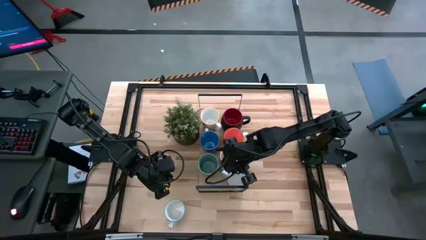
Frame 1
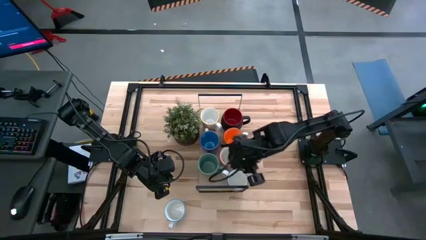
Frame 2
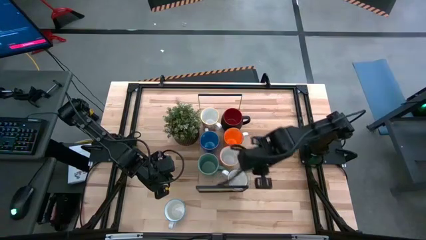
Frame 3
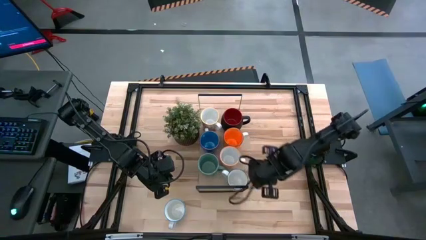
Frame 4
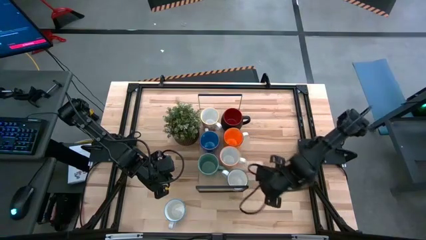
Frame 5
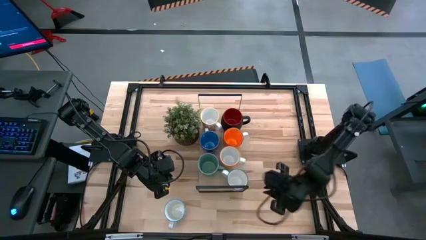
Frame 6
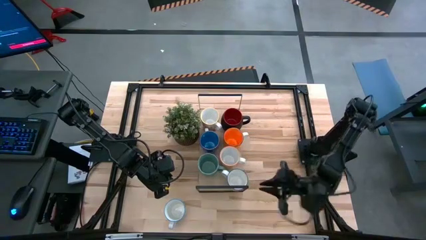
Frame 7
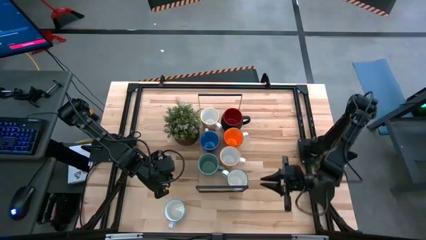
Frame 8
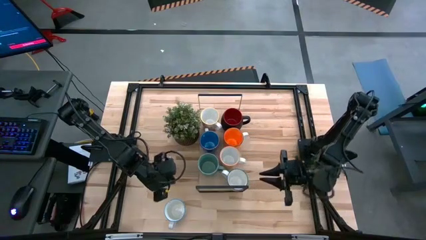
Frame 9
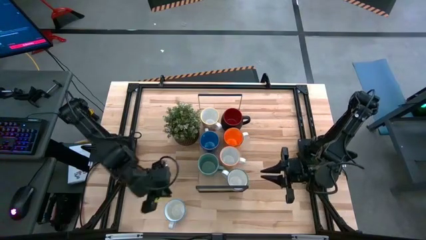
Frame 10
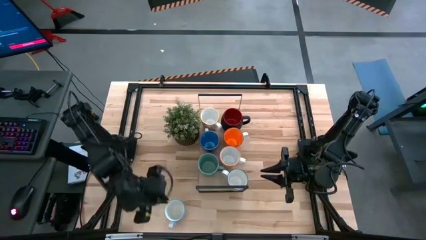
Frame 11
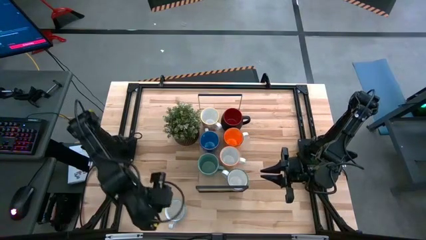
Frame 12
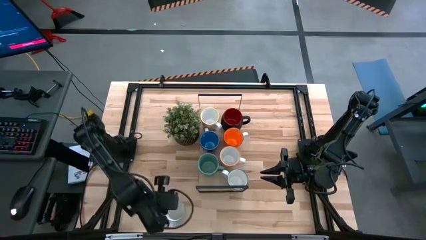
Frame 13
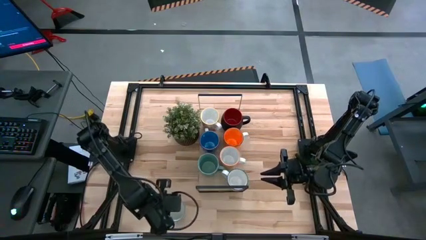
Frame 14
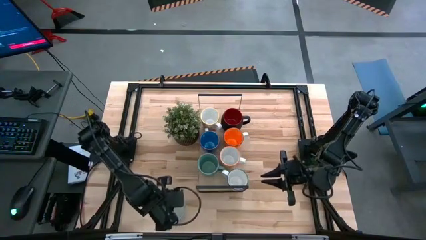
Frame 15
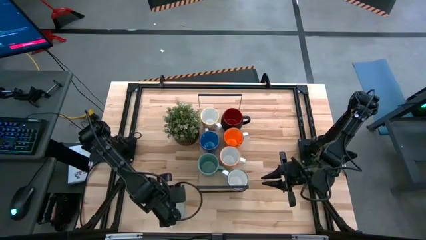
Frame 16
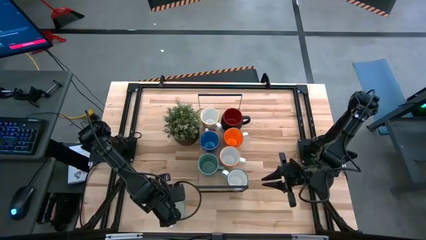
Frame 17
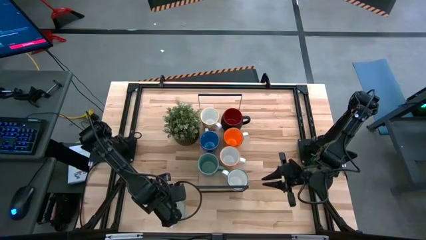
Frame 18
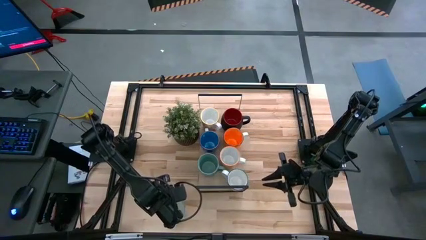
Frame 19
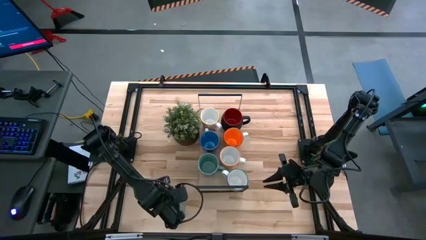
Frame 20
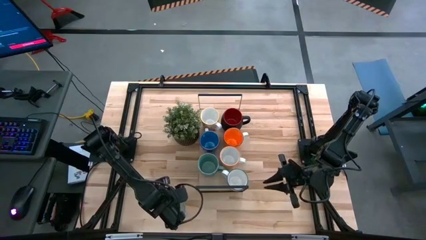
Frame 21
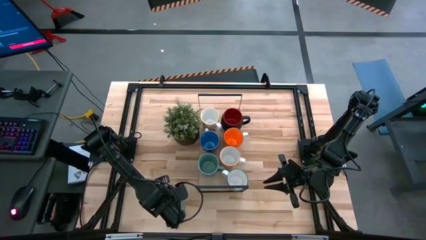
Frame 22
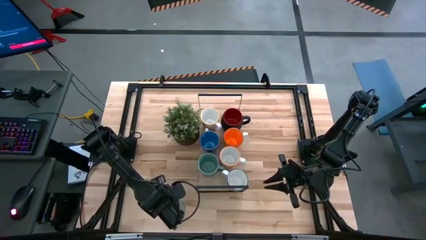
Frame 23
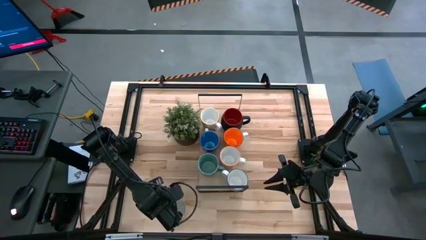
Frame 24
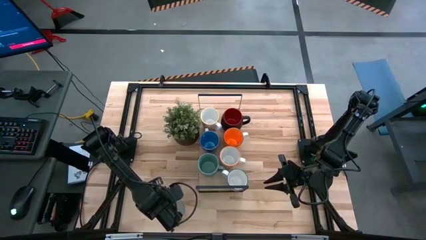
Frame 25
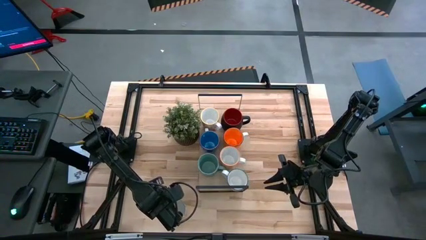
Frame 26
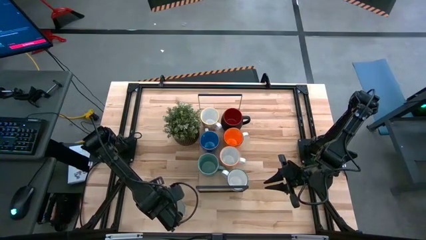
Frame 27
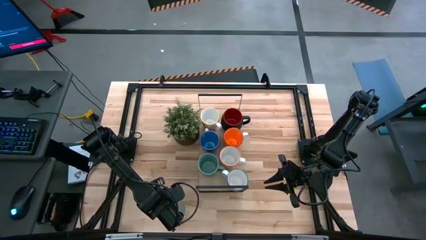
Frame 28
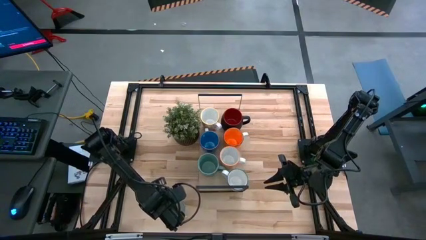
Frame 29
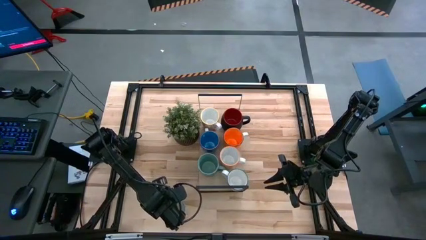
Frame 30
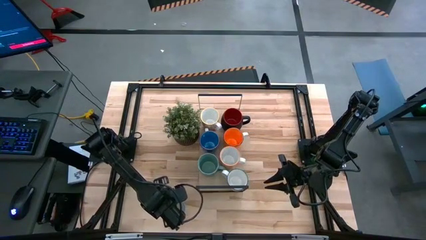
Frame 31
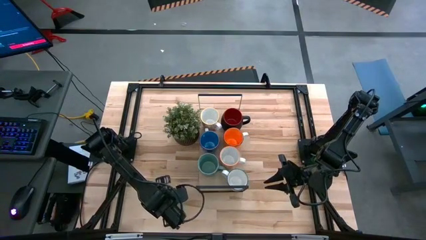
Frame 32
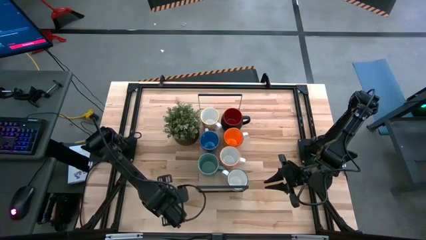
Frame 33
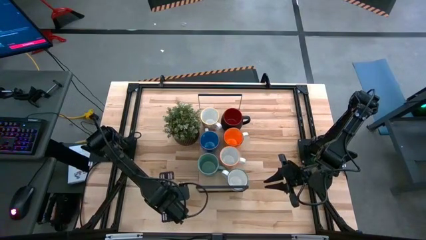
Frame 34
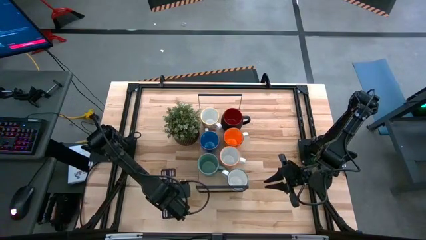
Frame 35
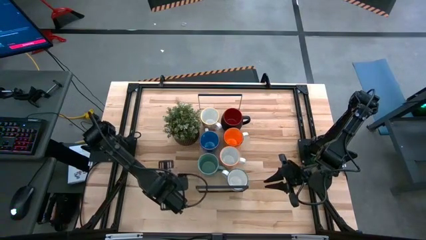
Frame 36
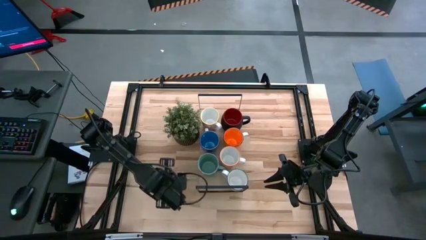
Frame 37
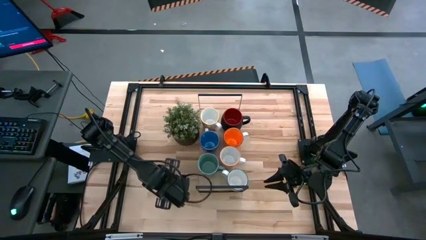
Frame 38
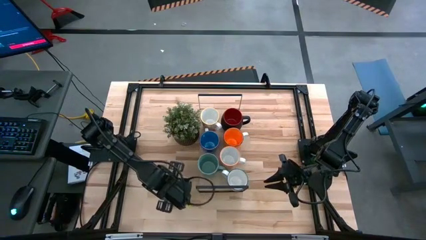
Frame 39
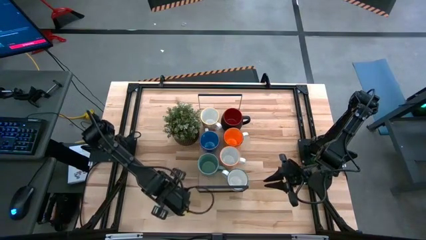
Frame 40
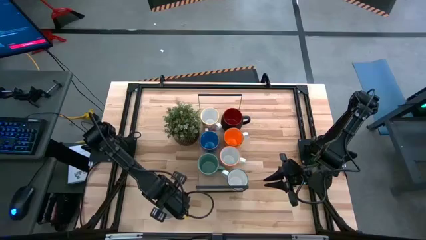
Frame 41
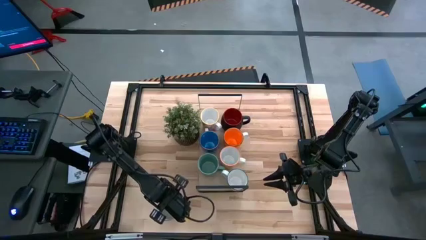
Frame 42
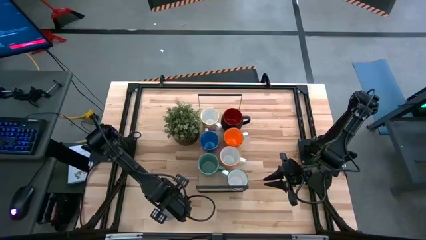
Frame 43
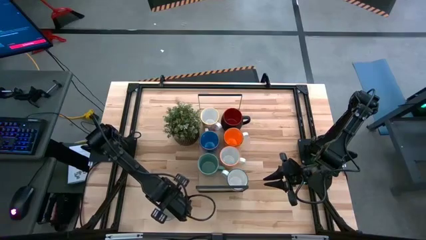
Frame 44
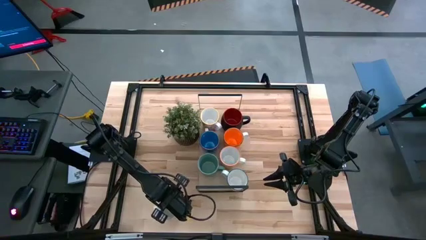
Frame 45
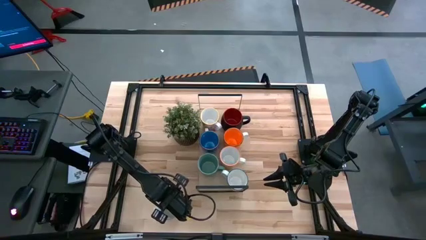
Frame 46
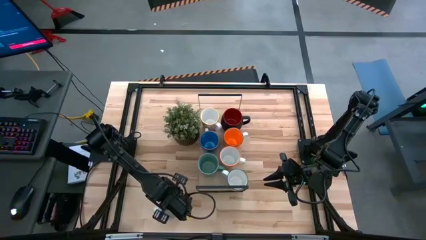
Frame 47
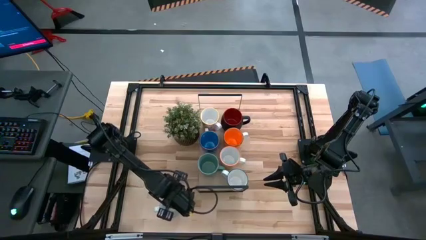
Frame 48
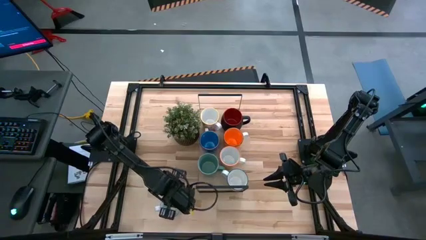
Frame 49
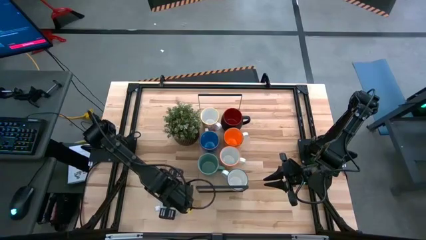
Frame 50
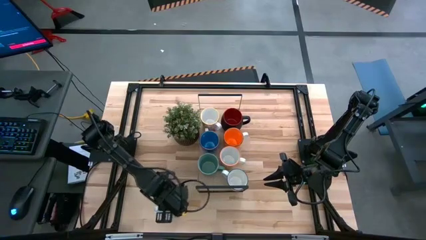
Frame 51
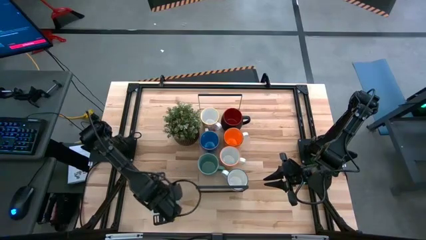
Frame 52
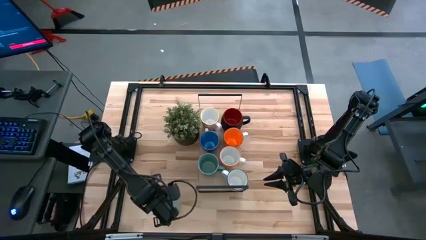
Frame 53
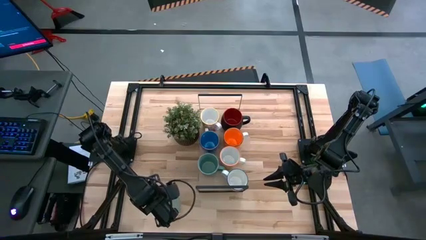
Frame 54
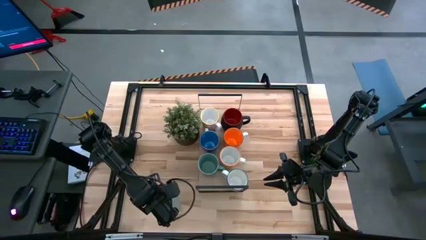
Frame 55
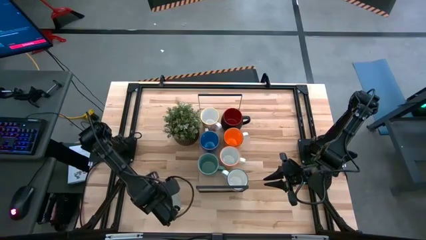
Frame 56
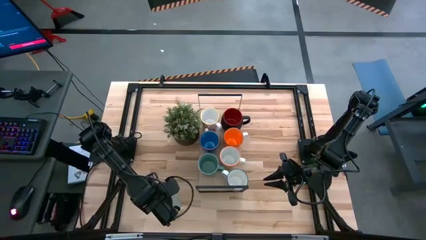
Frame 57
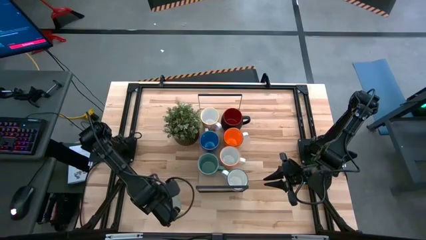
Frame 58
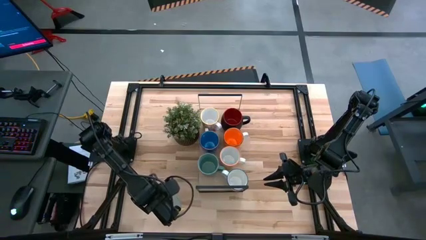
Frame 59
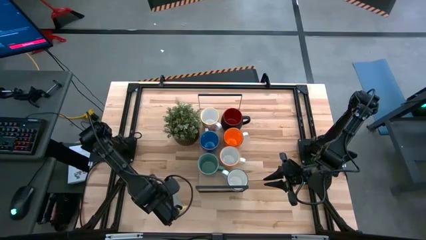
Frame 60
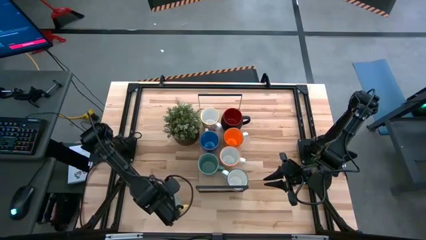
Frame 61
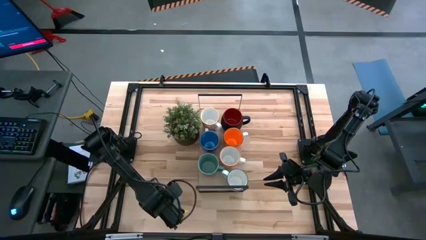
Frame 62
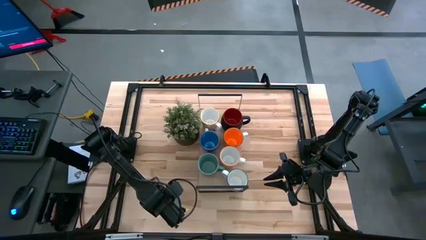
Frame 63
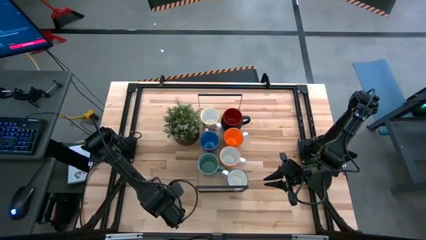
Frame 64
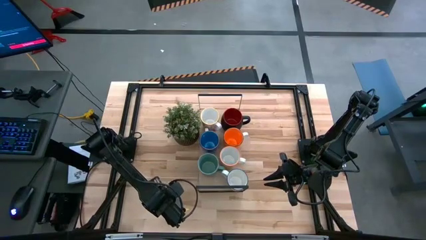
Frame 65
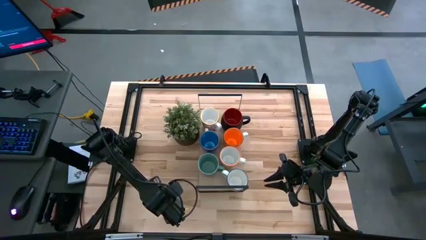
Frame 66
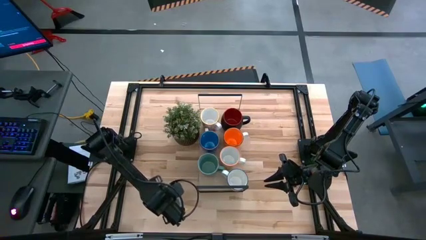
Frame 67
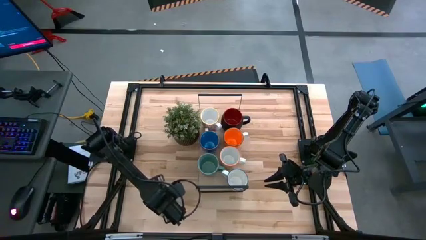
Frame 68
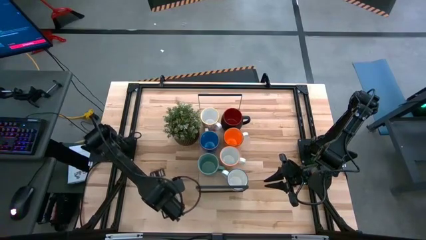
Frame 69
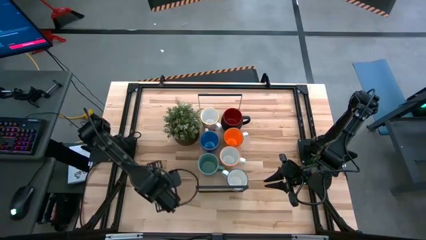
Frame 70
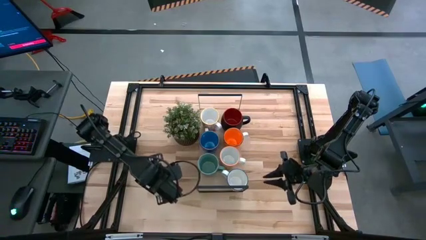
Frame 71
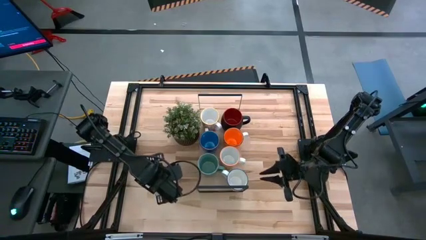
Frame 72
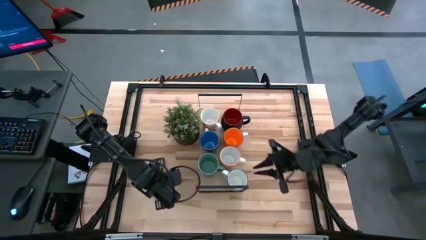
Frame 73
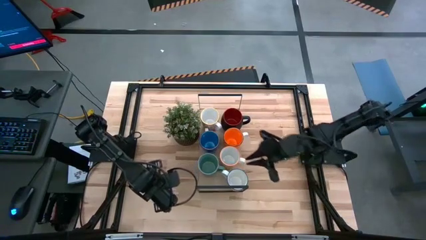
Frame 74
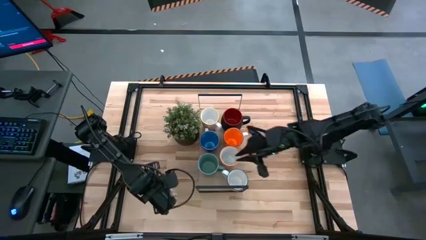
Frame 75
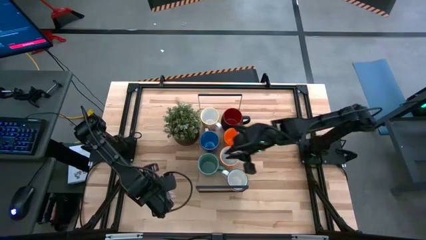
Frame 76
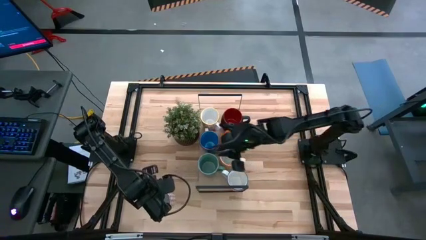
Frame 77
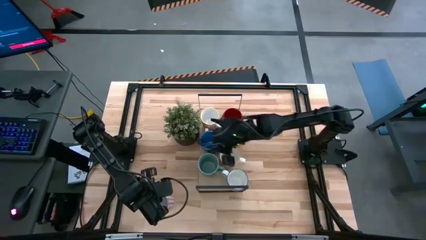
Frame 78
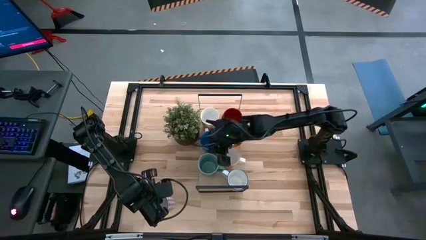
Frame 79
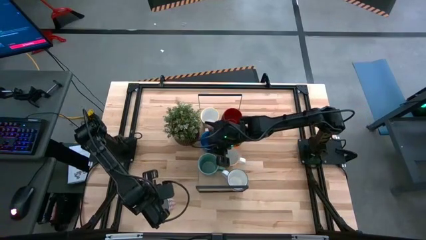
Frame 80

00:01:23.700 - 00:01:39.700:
Task: Place coffee mugs
Put the patterned red mug on the shelf

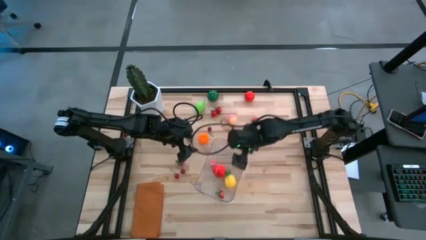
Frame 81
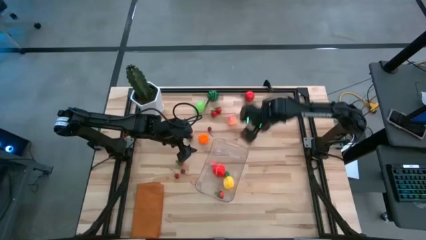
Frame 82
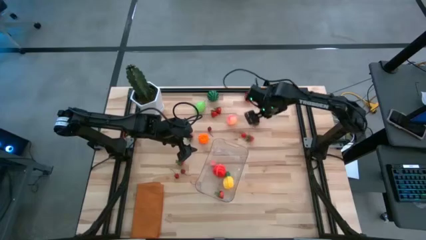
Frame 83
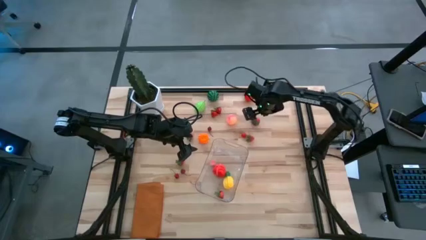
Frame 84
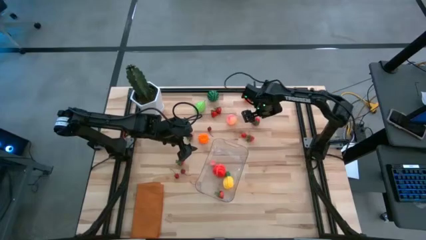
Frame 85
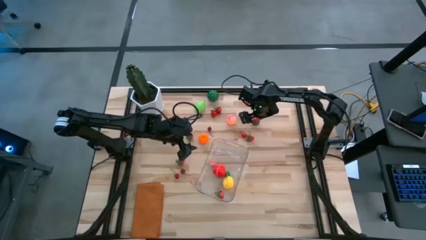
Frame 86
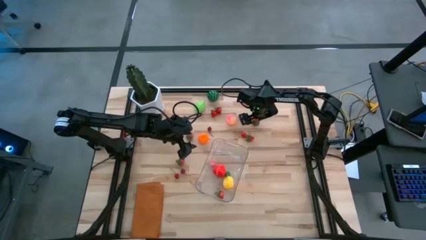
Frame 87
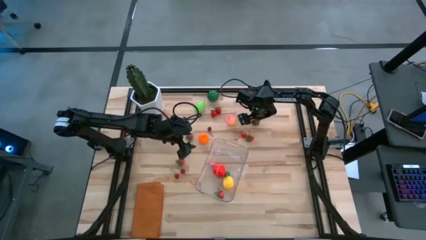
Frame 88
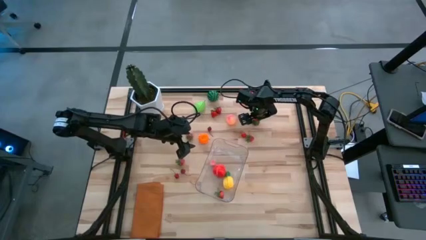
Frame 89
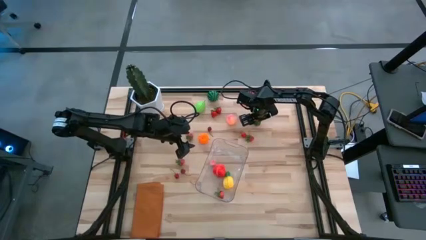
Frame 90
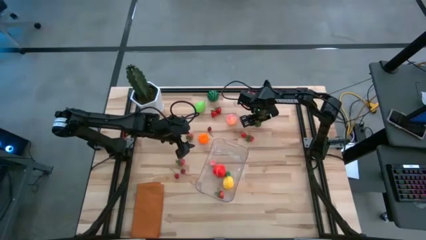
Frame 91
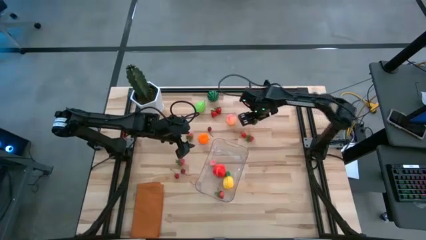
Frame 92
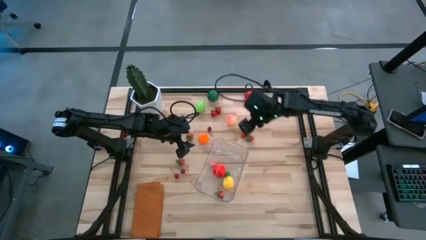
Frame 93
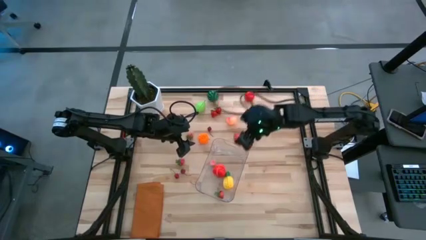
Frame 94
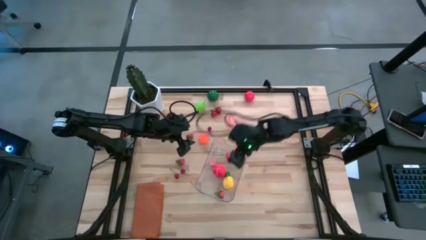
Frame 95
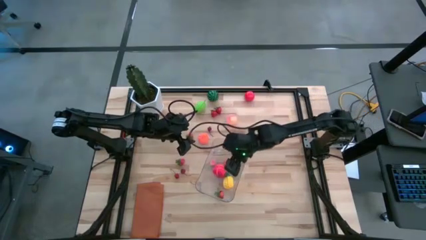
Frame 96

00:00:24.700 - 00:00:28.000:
Task: Pick and placing Produce into tupperware
Put the red strawberry into the transparent bin
